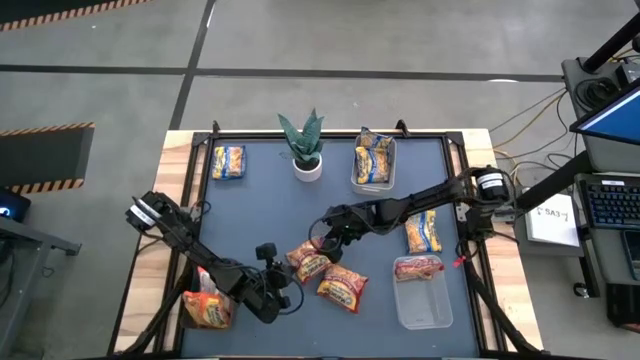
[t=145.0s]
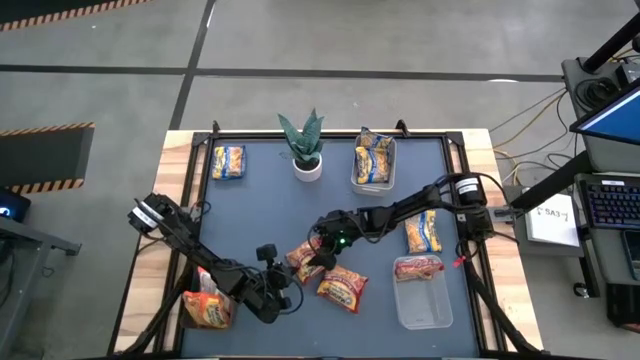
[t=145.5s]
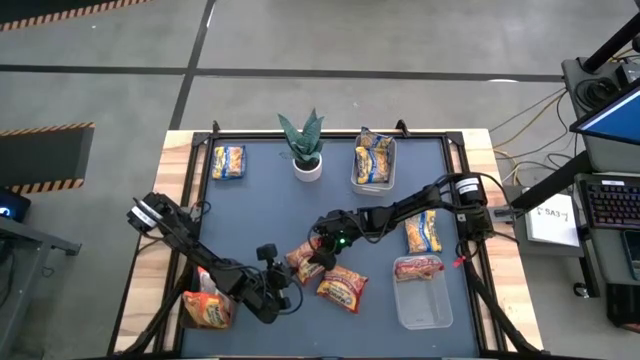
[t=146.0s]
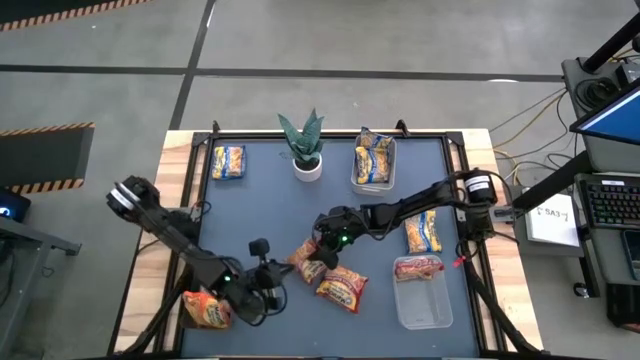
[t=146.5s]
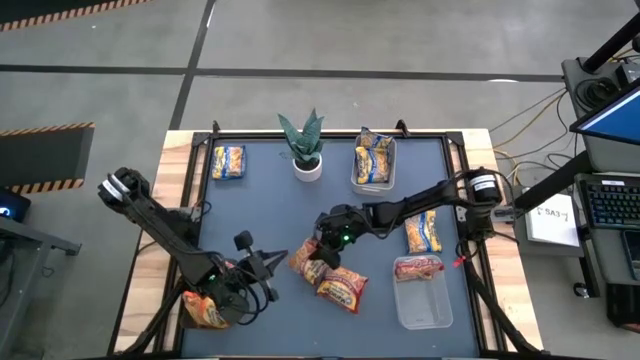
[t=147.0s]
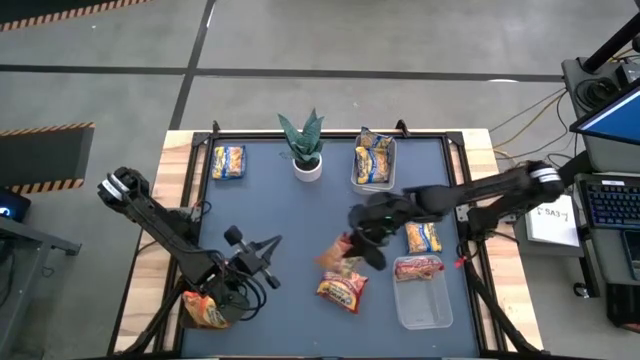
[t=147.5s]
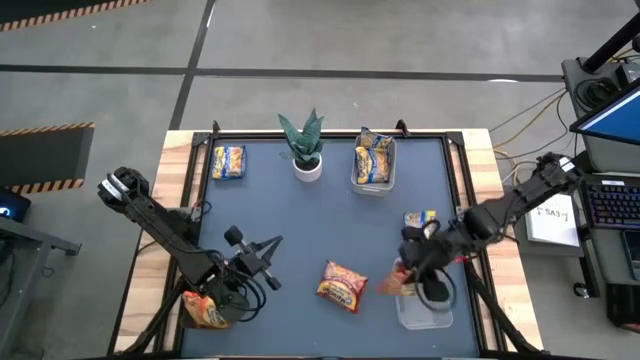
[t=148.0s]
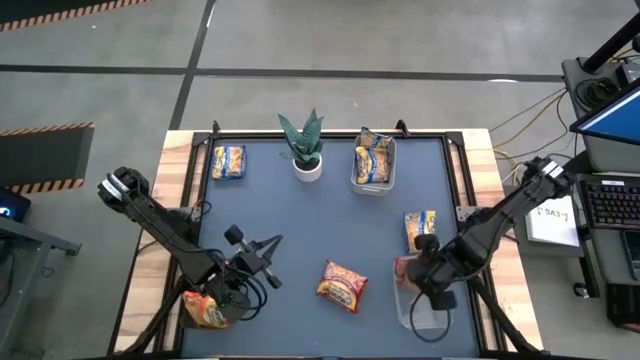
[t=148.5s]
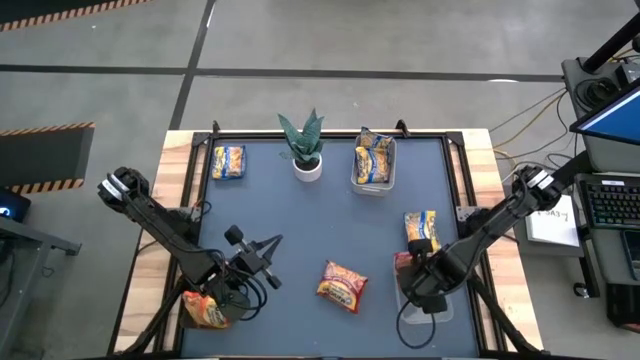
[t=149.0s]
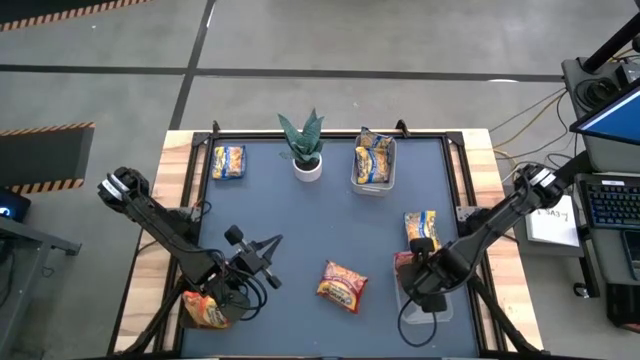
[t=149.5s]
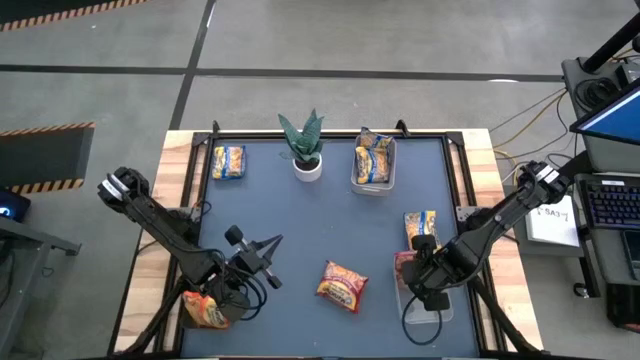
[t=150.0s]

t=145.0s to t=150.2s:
Task: Sort Maruchan noodles
Put the left red instant noodle pack into the transparent bin

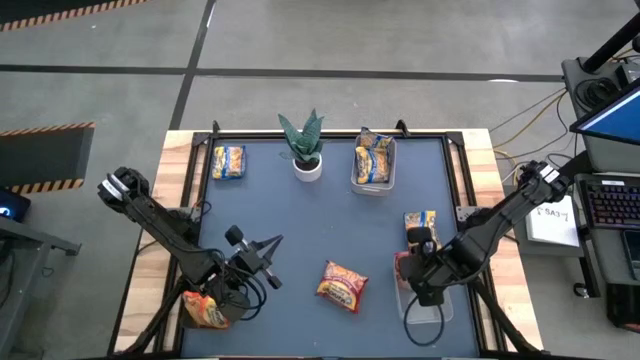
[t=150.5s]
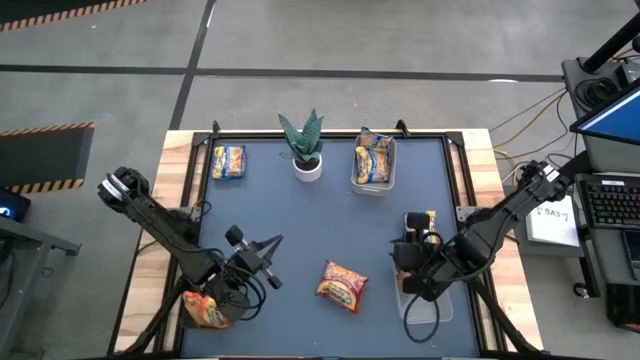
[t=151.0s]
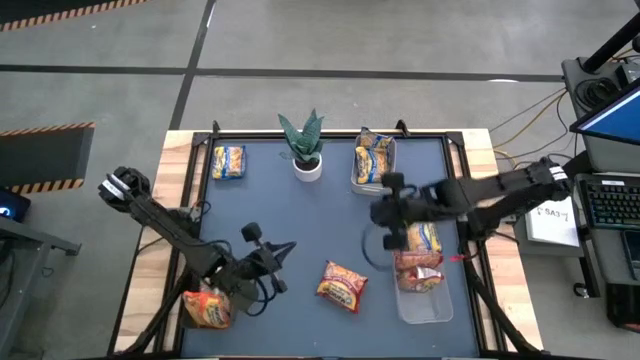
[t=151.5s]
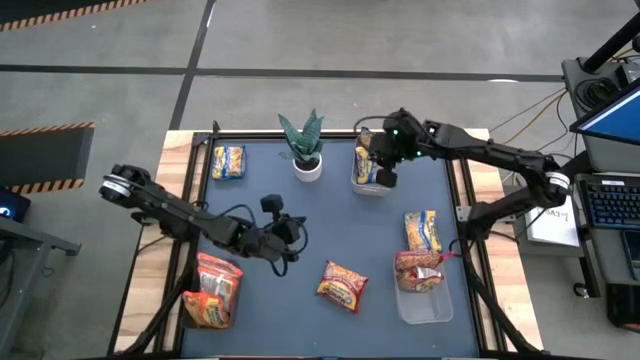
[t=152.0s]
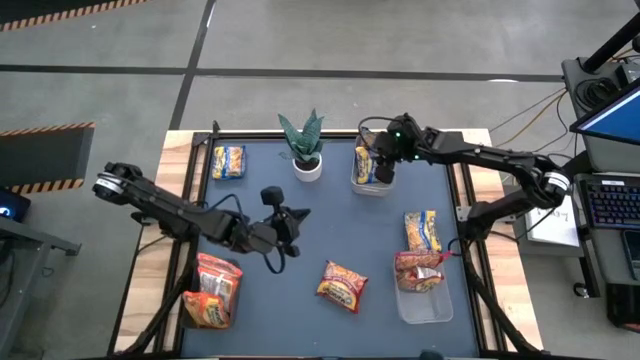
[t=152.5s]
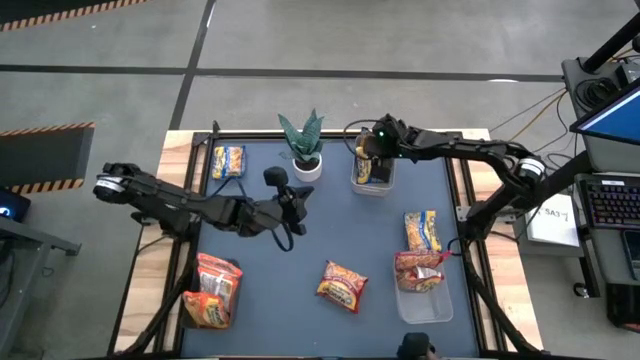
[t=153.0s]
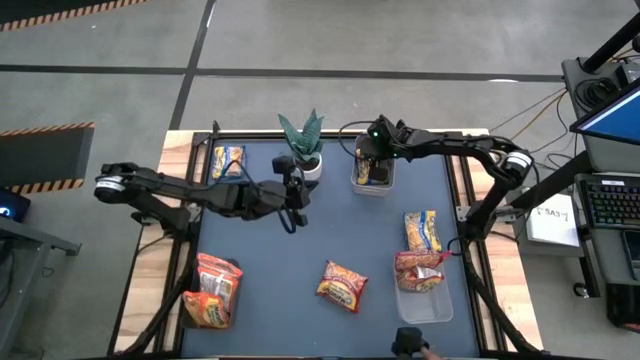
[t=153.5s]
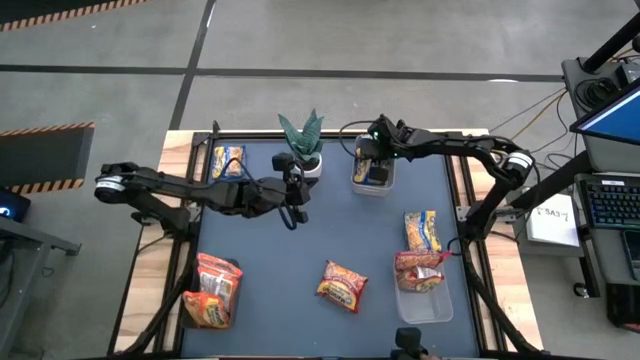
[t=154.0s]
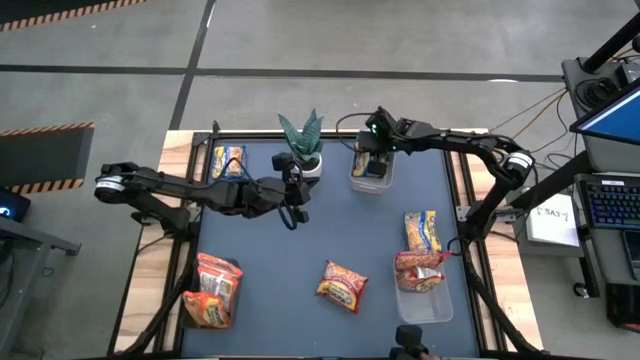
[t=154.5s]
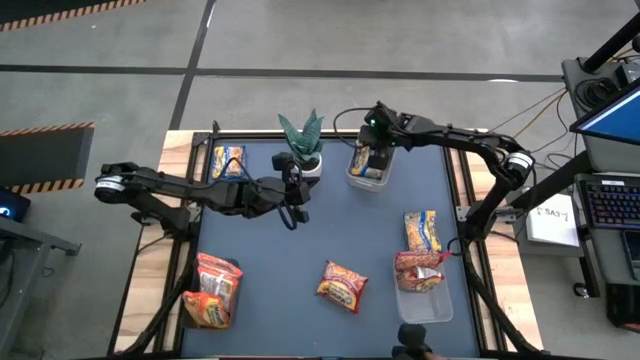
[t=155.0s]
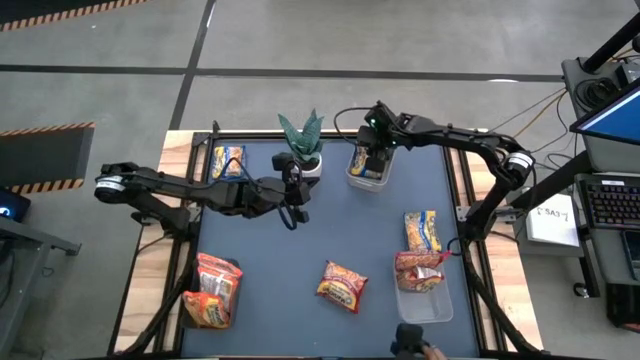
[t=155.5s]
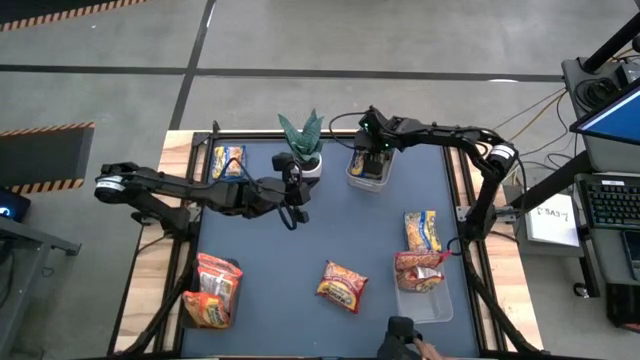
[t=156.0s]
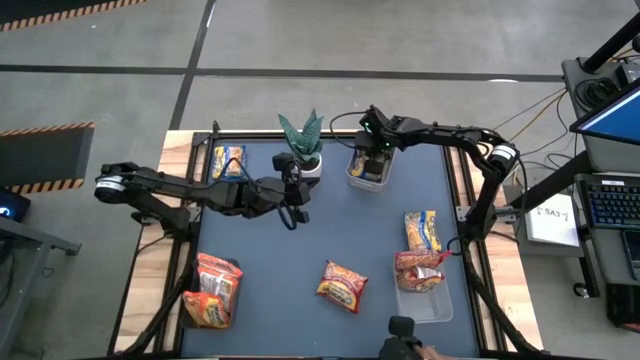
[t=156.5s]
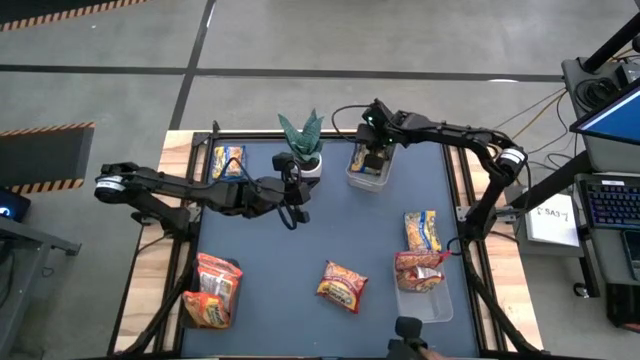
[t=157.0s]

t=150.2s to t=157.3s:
Adjust the blue instant noodle pack in the gray bin

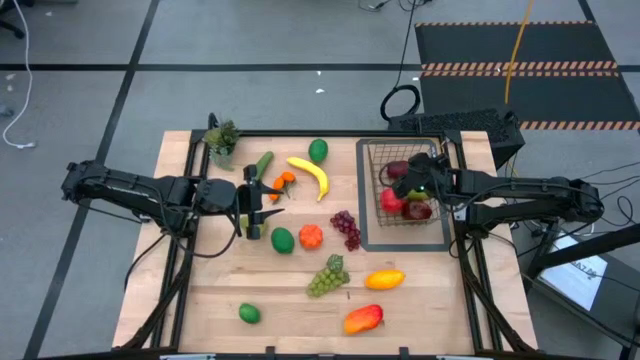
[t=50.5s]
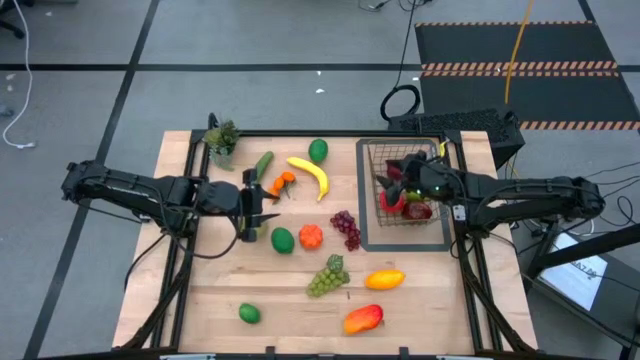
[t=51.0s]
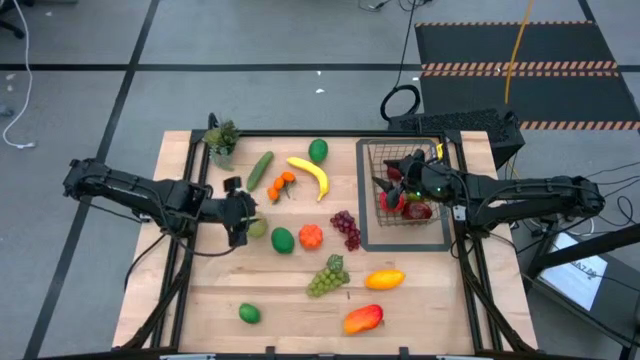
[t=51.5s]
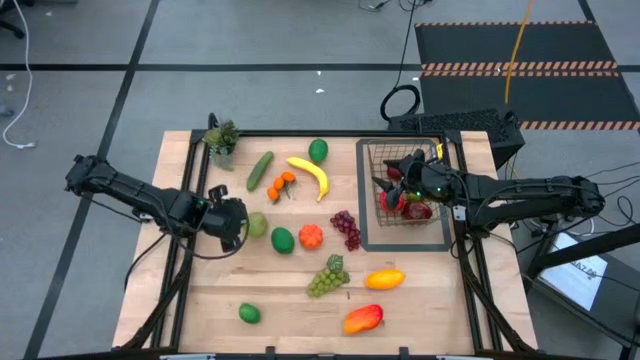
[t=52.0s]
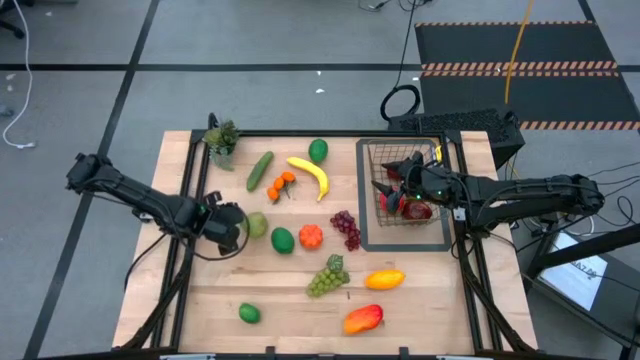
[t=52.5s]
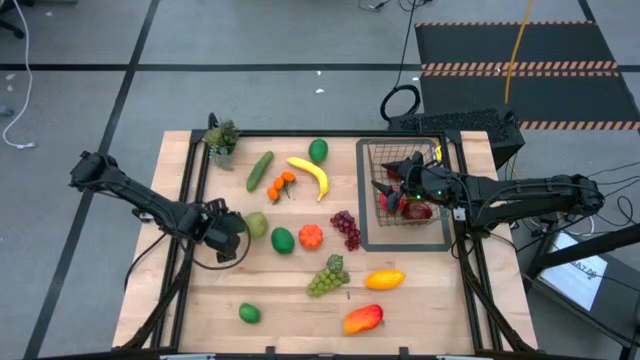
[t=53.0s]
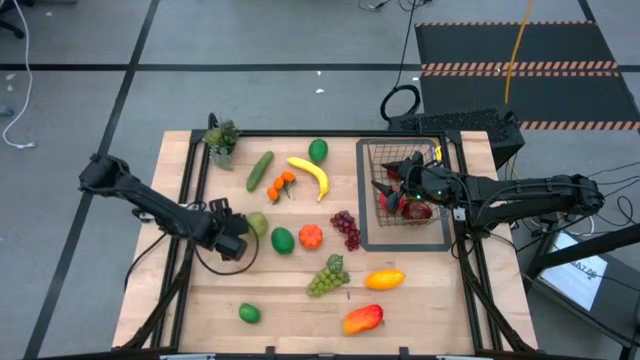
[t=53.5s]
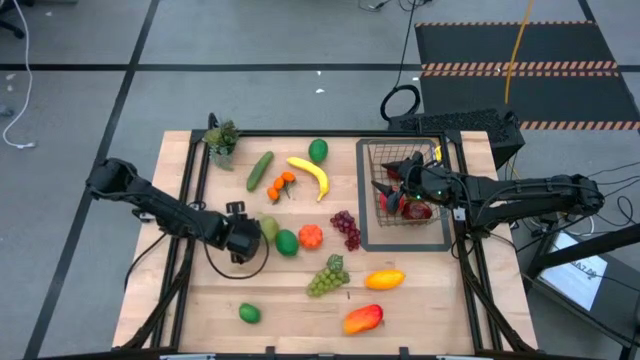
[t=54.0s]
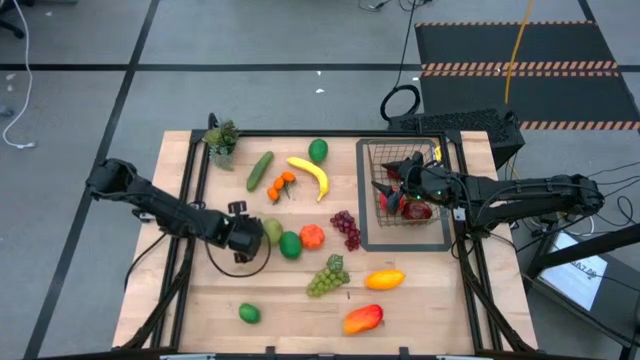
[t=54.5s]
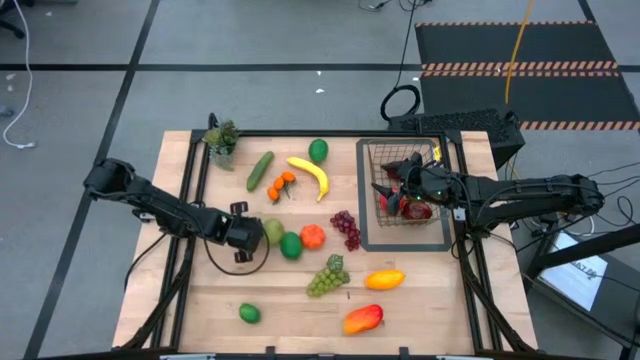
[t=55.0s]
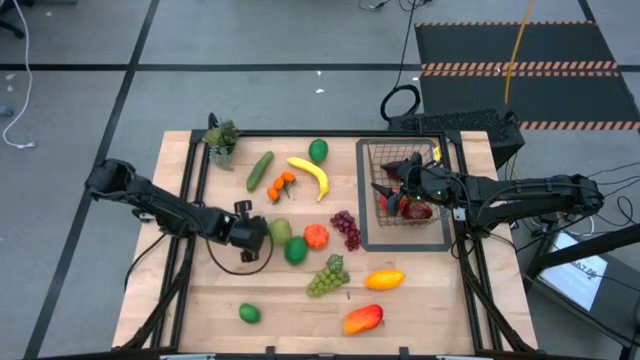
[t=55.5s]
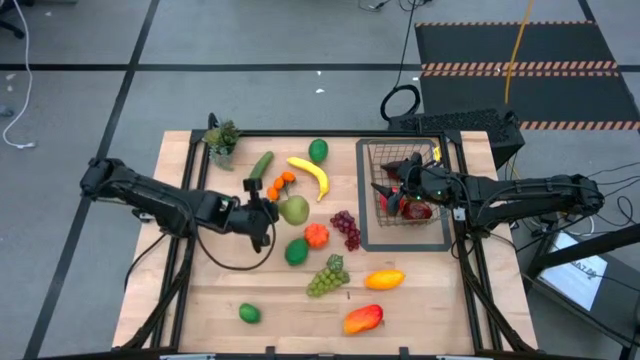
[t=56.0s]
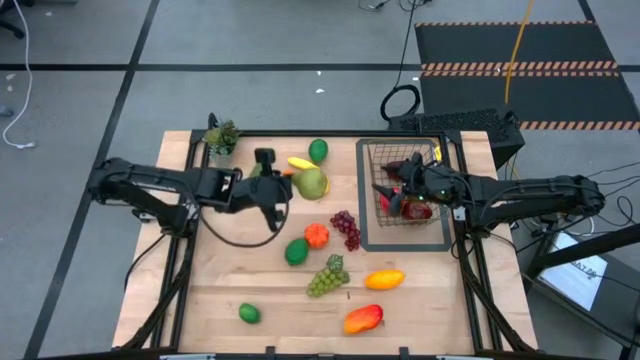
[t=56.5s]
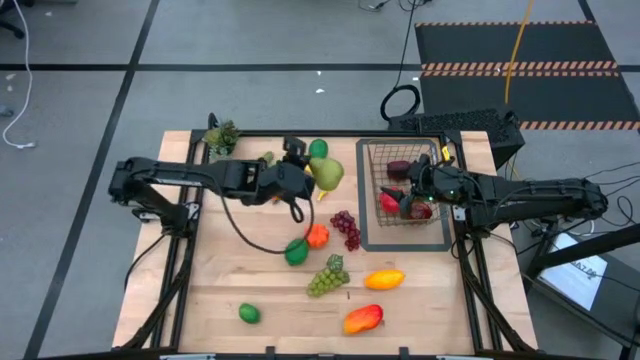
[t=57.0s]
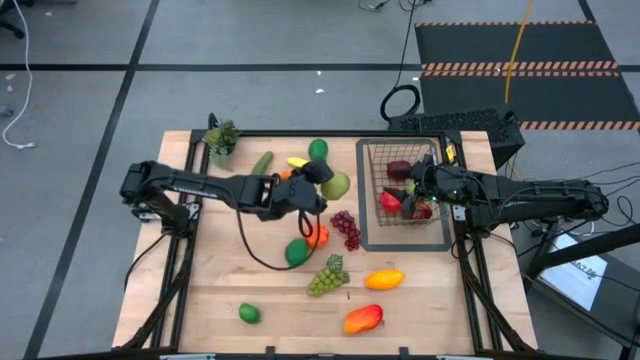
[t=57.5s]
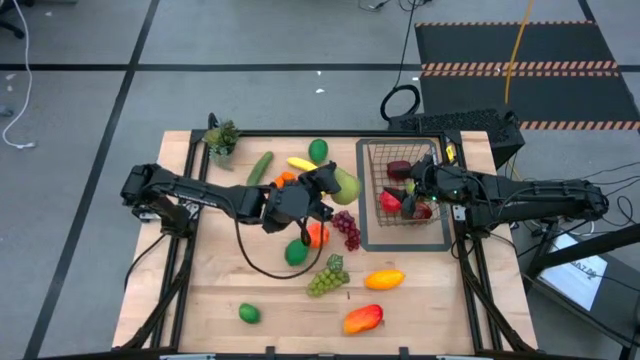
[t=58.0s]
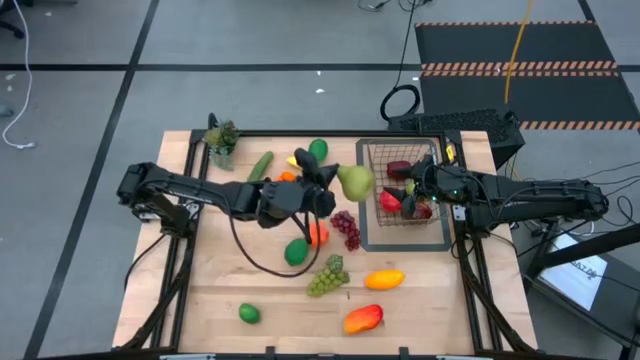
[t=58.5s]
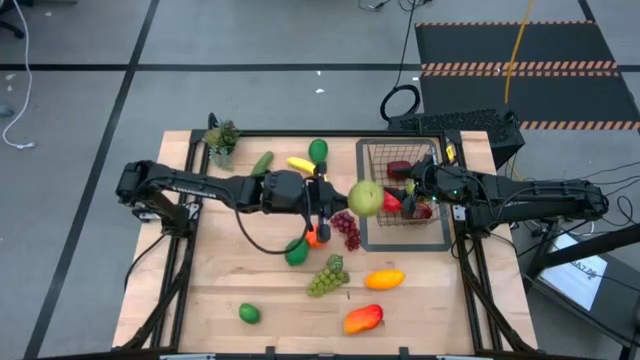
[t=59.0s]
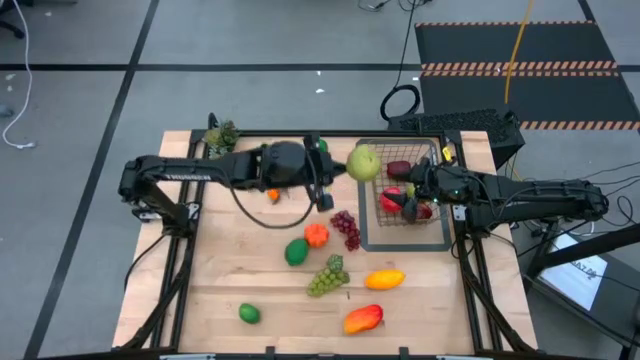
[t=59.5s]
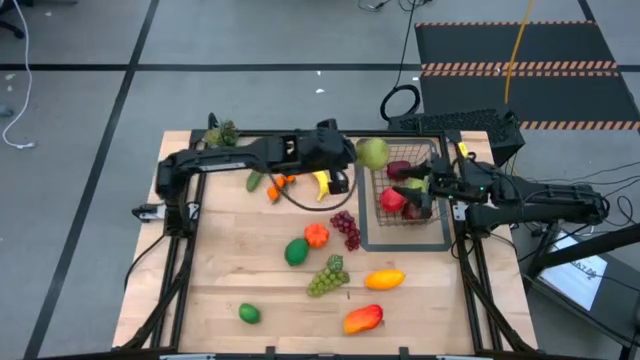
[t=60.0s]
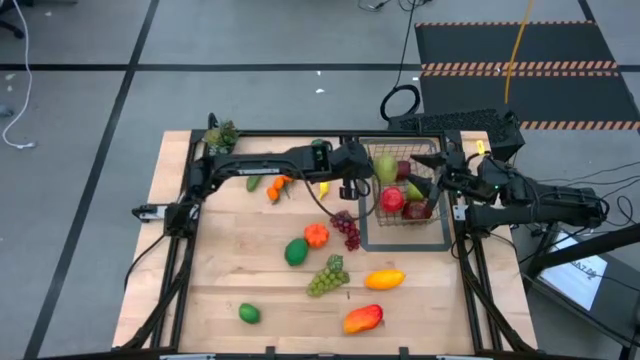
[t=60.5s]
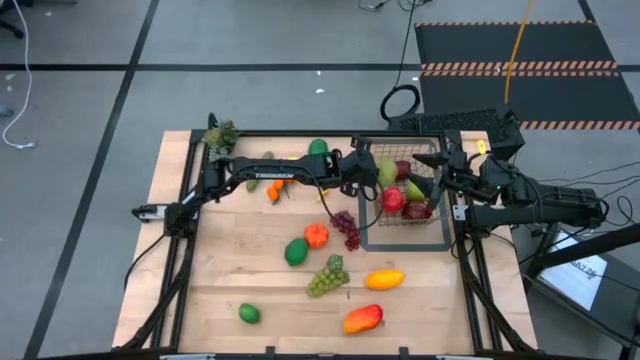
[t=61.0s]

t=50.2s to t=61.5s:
Task: Build produce basket
Put the pear into the gold wire basket
